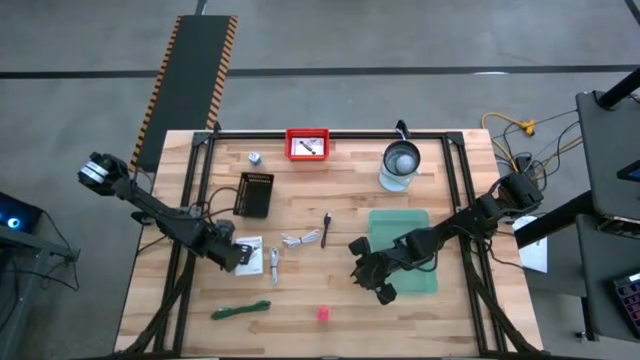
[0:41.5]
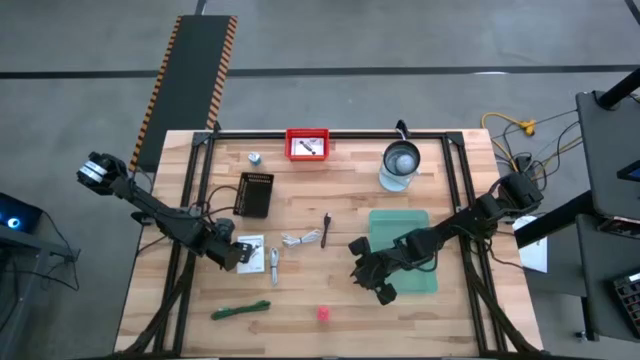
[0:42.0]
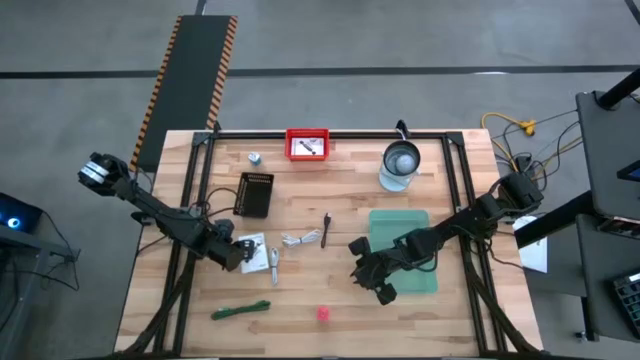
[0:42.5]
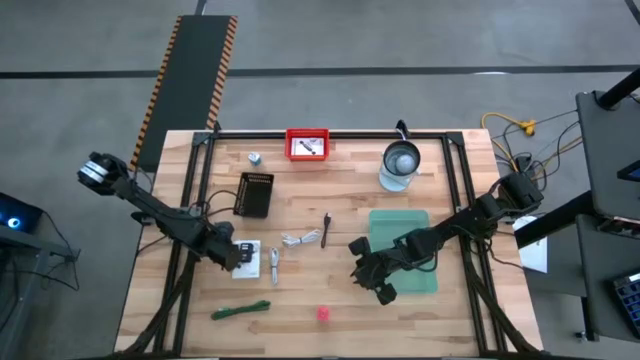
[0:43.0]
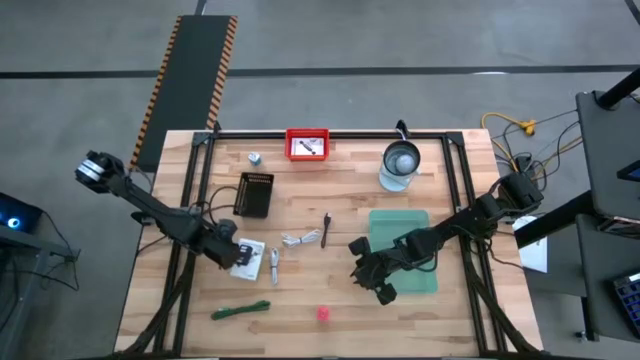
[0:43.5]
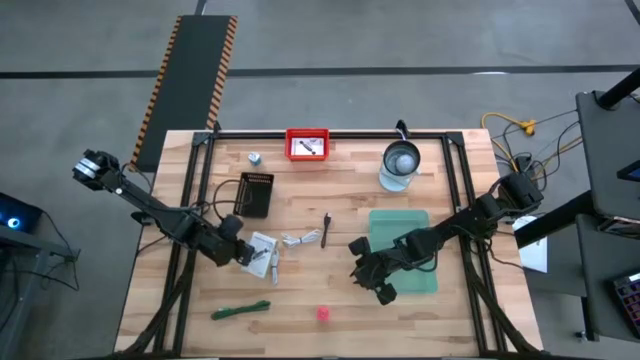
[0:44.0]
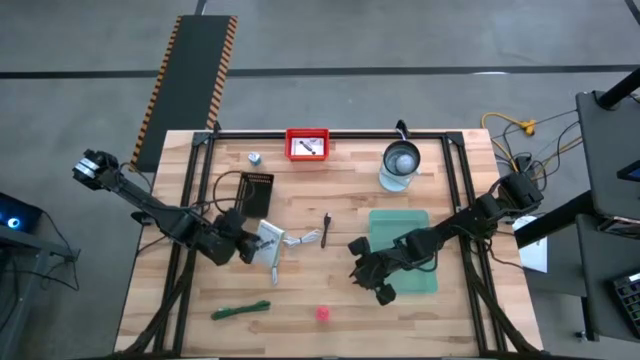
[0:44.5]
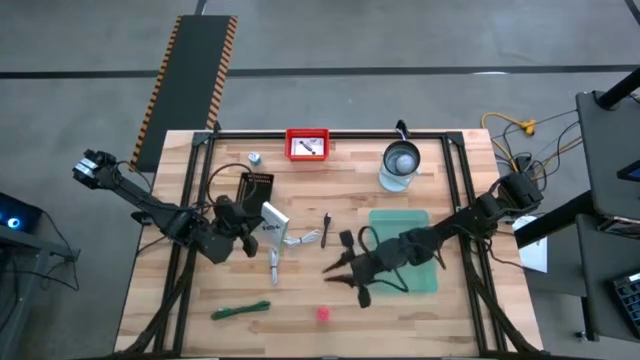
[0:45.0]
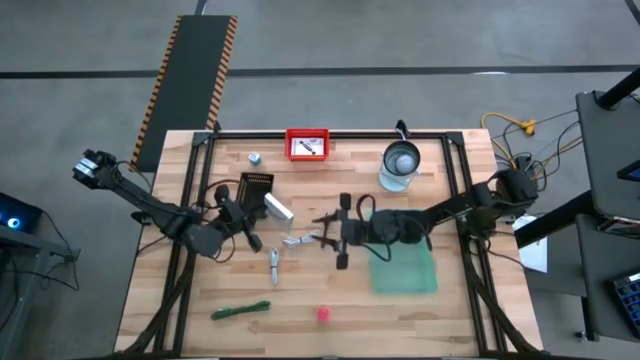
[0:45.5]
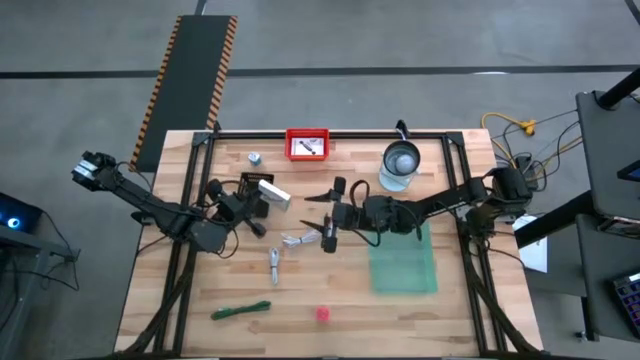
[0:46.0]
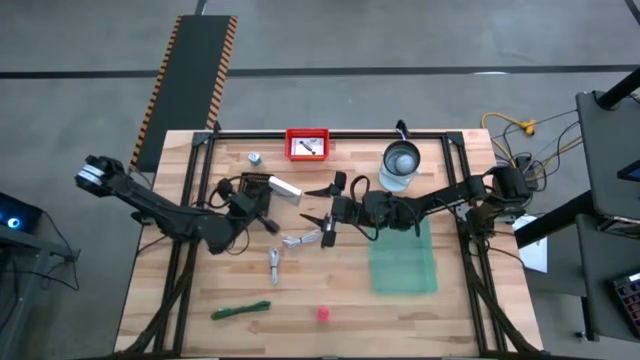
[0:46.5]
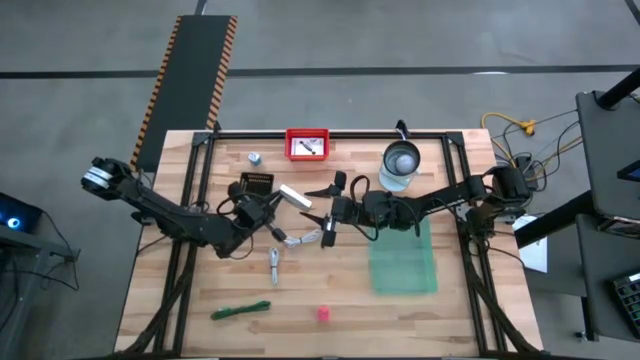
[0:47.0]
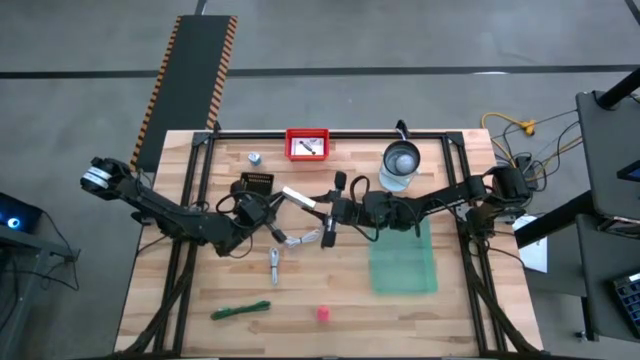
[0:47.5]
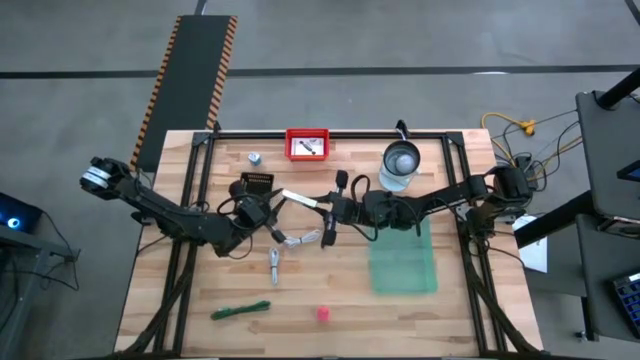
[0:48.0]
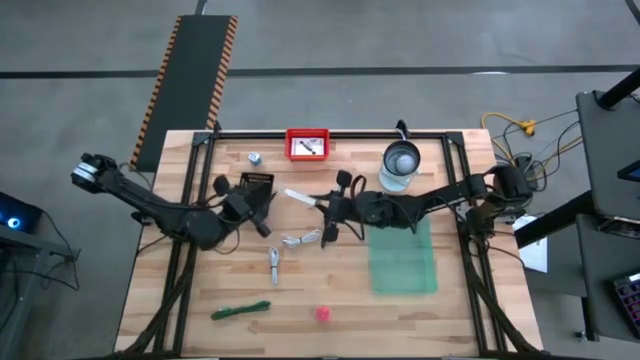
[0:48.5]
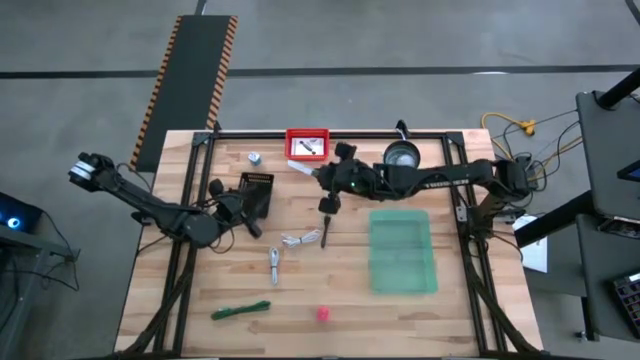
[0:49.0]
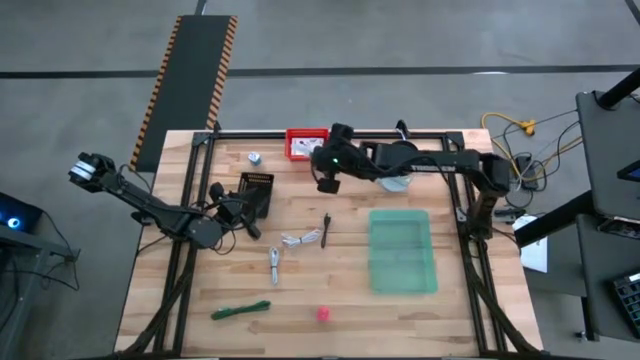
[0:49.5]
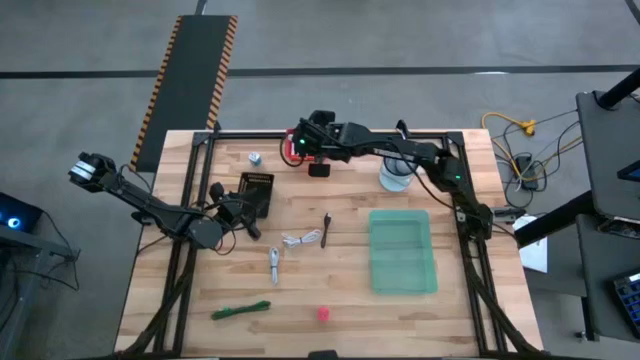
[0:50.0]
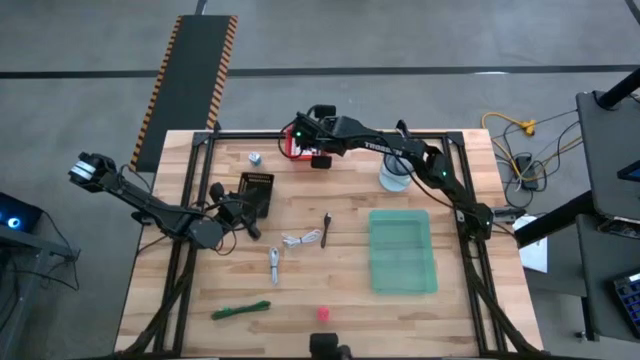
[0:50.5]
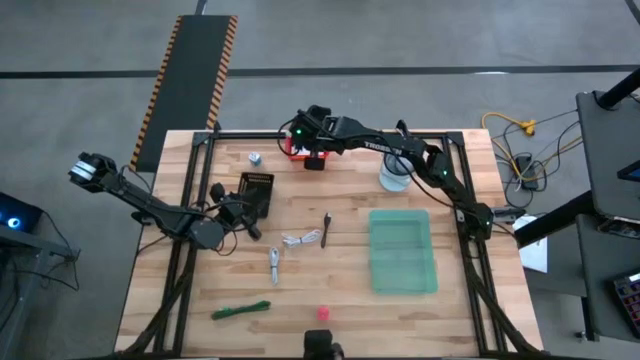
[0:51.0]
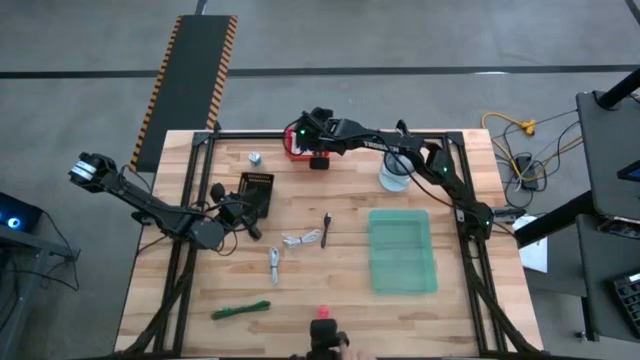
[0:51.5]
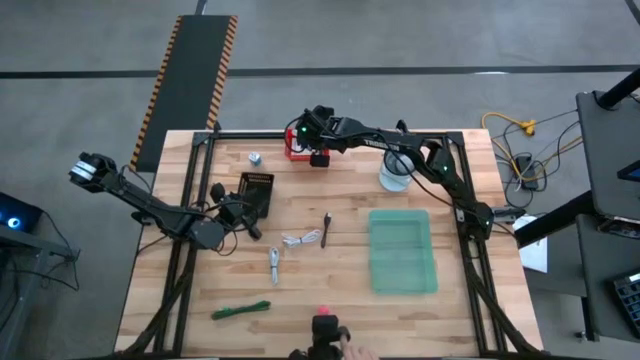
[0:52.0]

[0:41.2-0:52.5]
Task: Pick and place items into bin
Put the card reader box into the red bin

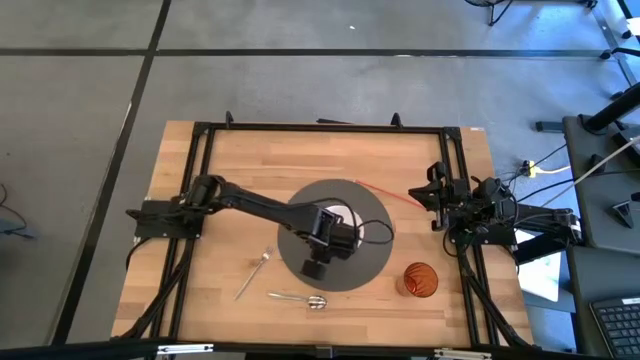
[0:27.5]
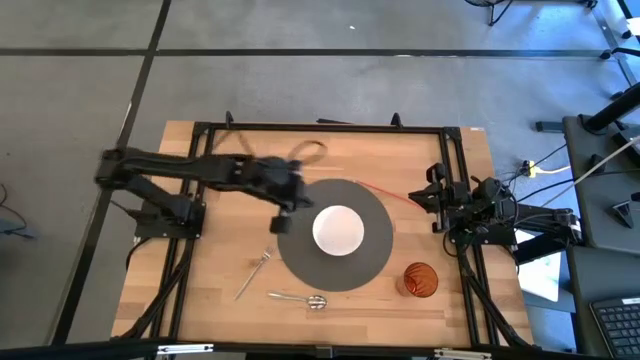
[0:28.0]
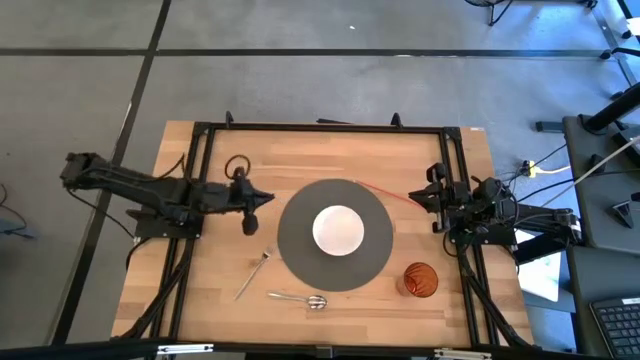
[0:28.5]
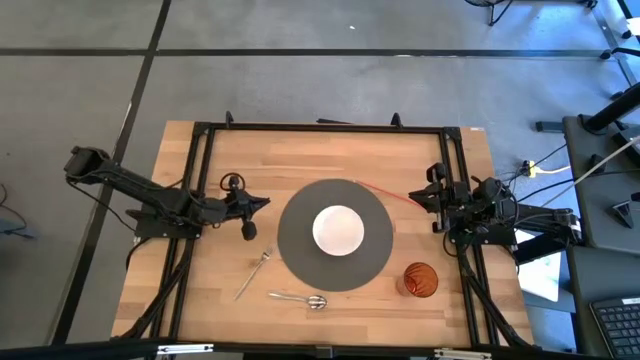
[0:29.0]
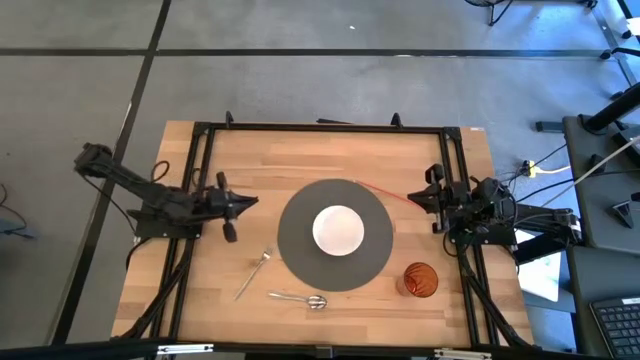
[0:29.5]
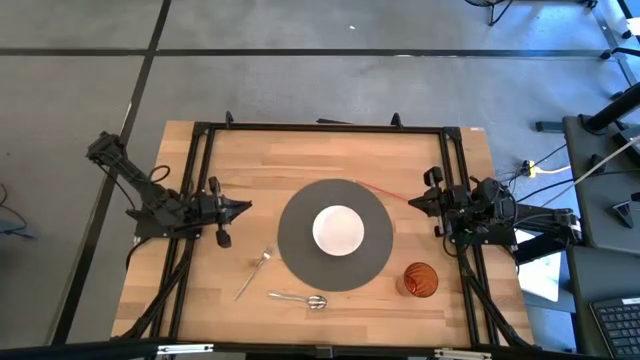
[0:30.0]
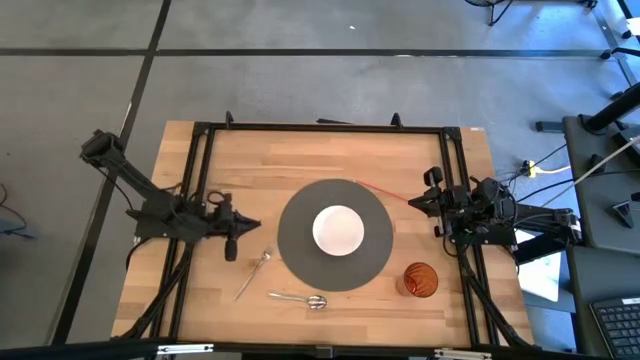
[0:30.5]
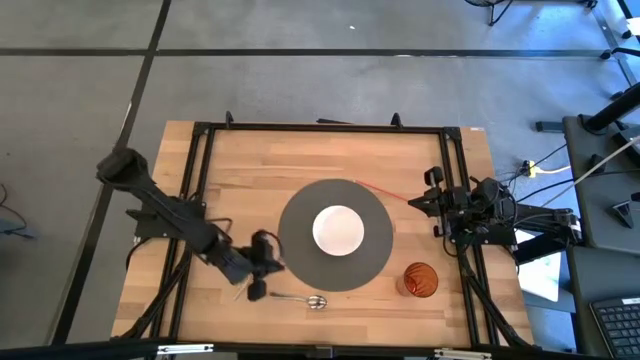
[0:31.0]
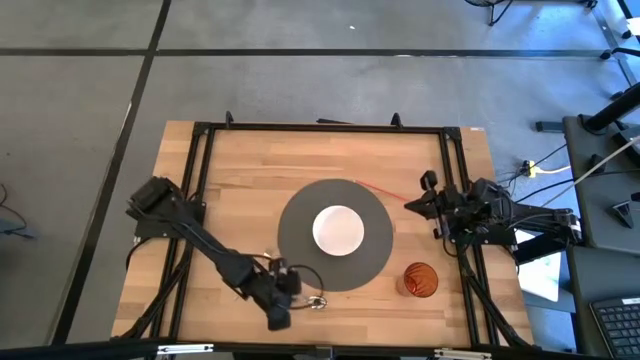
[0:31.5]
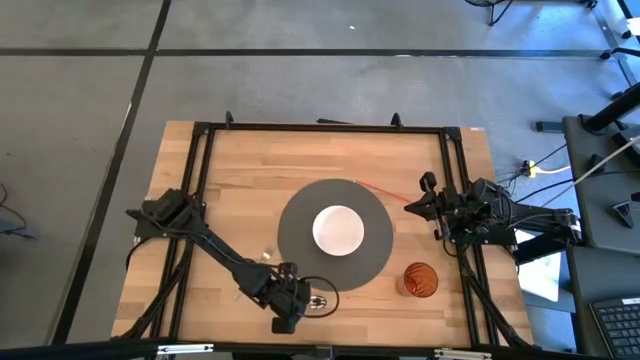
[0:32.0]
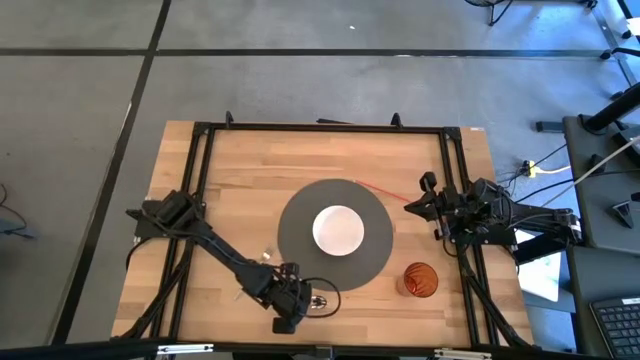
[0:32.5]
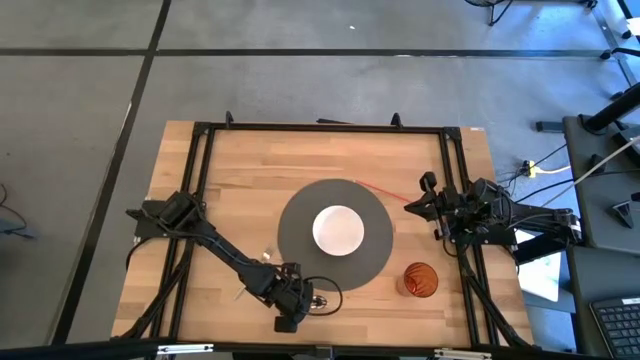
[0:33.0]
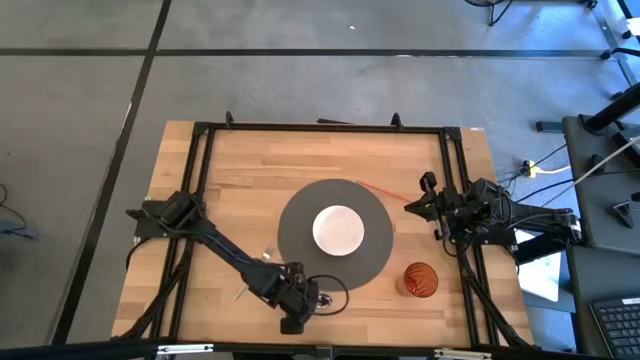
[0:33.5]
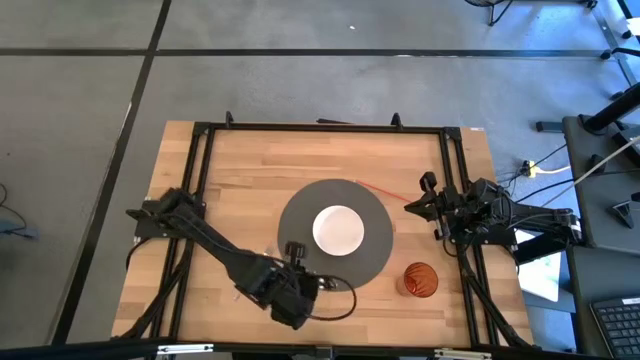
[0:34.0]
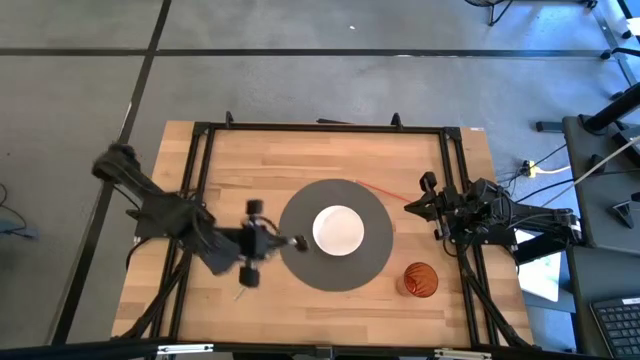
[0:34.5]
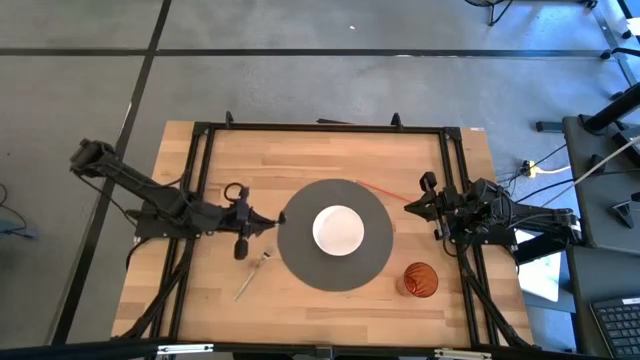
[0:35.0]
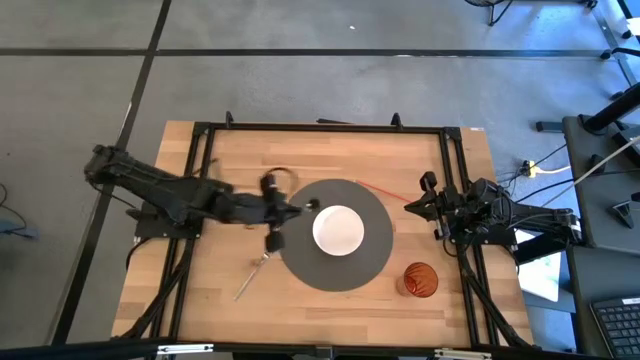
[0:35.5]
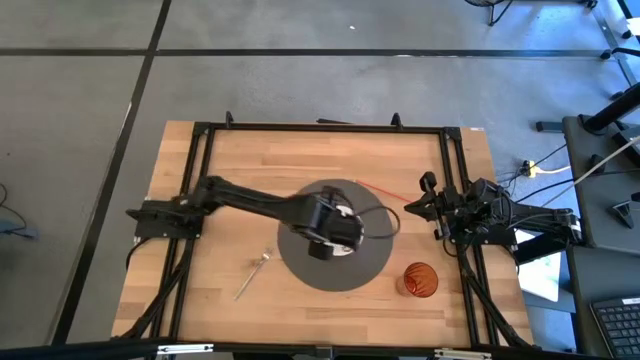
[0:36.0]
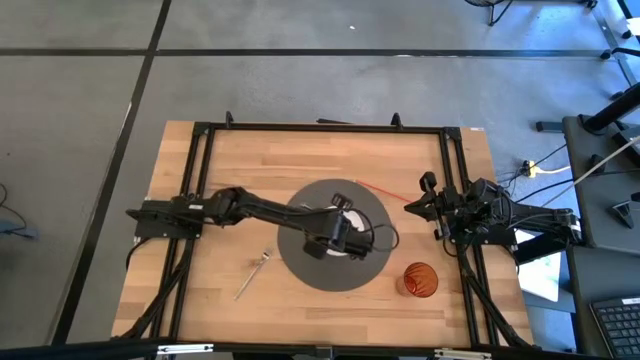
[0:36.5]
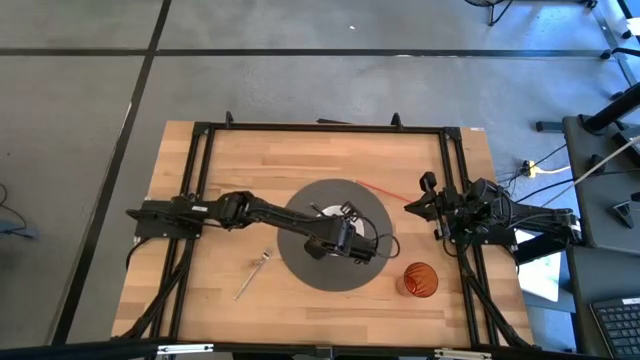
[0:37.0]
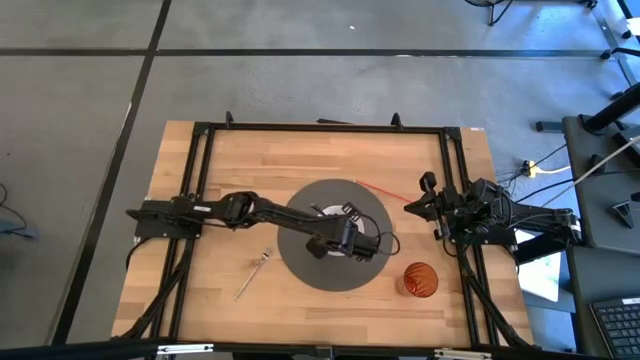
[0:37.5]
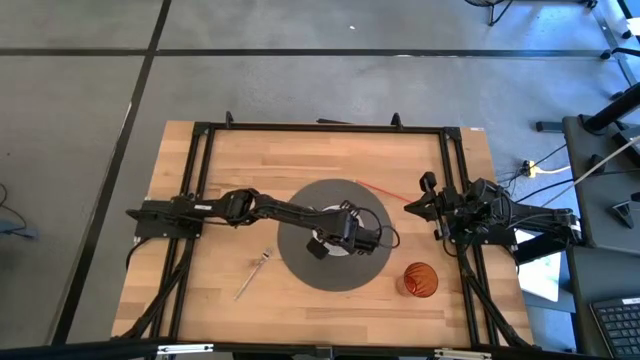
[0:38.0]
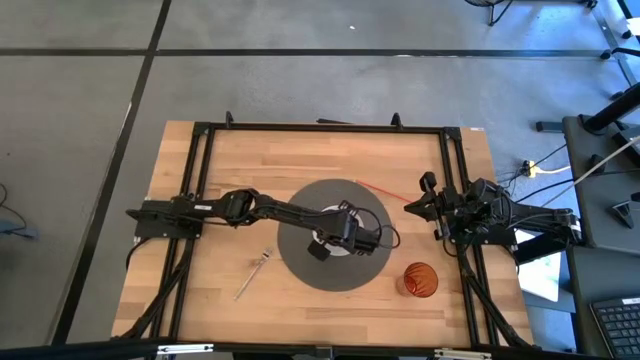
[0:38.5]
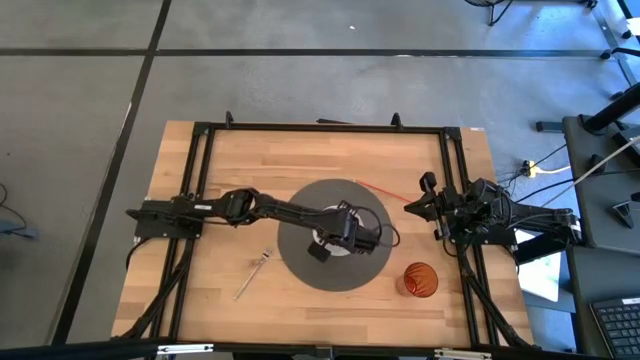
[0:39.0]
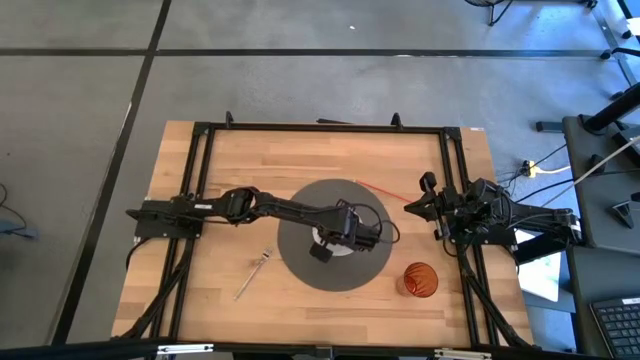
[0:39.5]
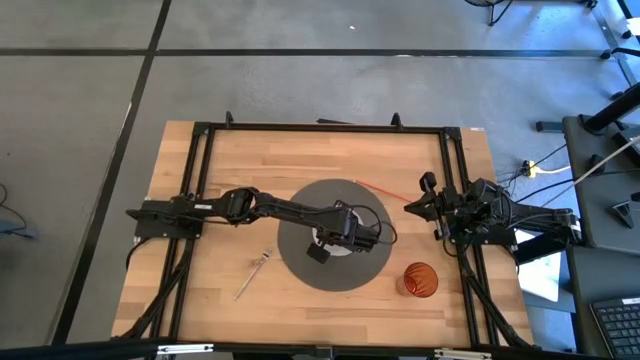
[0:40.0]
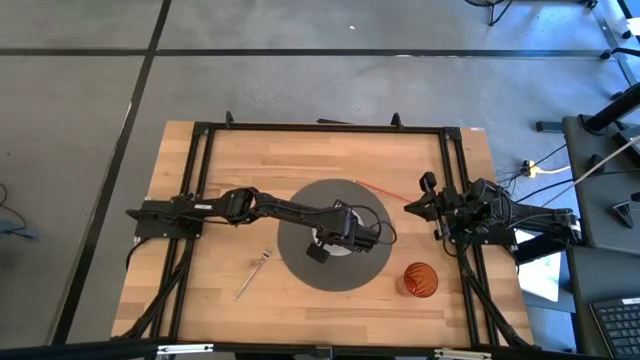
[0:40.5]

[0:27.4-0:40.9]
Task: Pick & Place Utensil
Put the silver spoon into the white bowl
